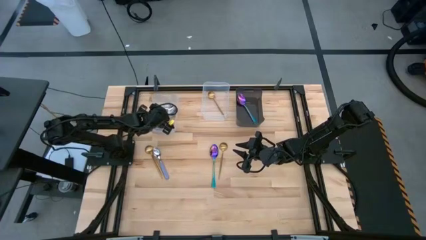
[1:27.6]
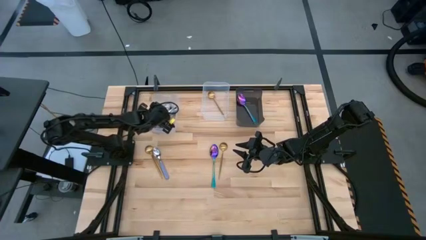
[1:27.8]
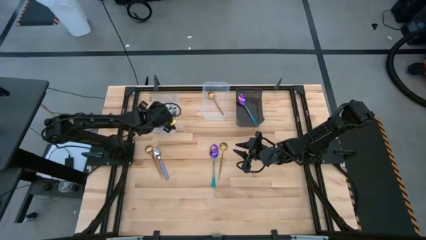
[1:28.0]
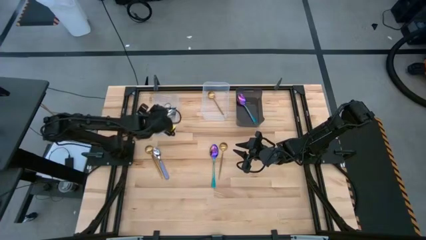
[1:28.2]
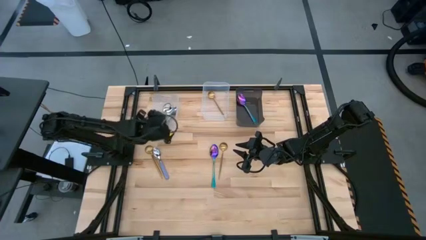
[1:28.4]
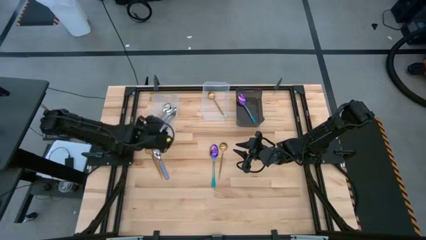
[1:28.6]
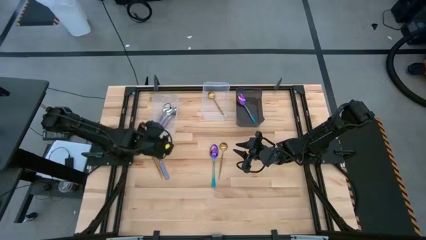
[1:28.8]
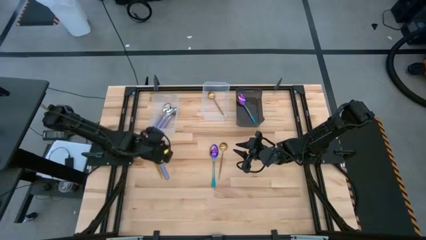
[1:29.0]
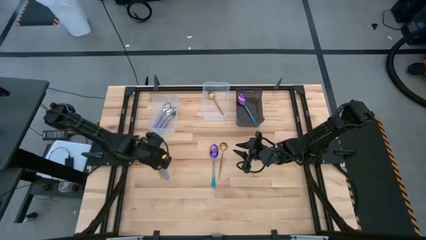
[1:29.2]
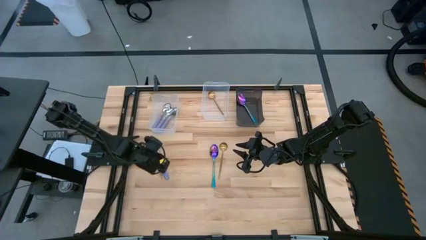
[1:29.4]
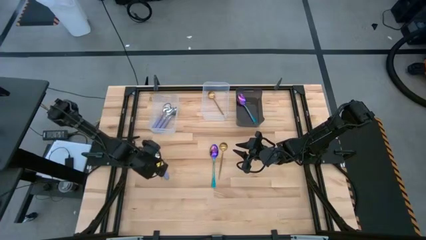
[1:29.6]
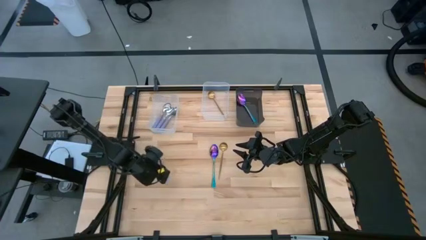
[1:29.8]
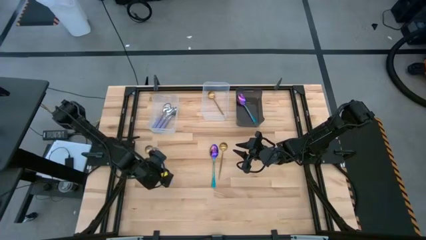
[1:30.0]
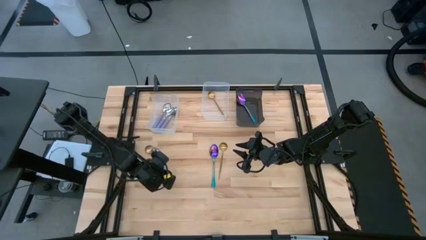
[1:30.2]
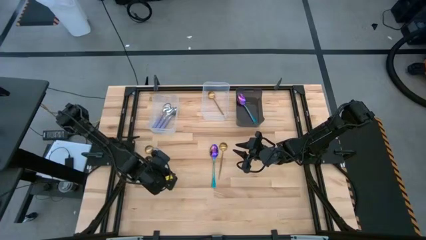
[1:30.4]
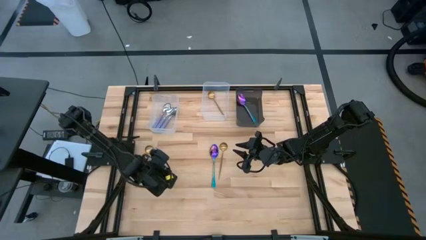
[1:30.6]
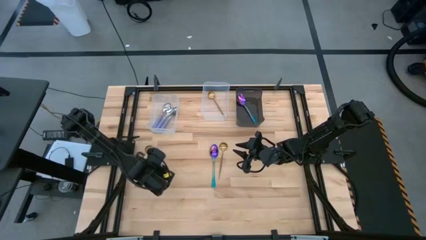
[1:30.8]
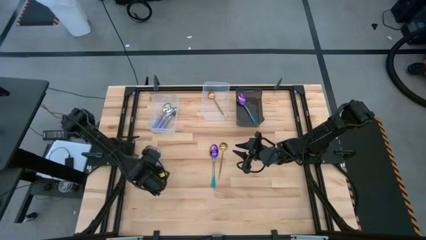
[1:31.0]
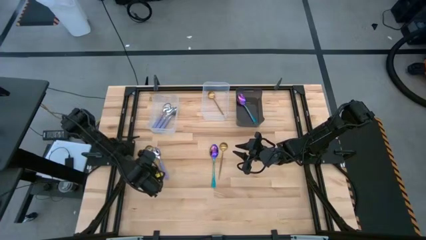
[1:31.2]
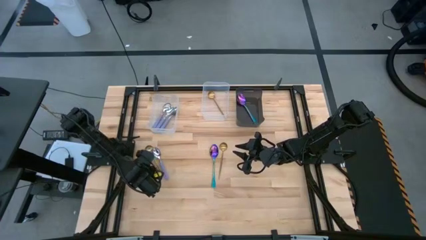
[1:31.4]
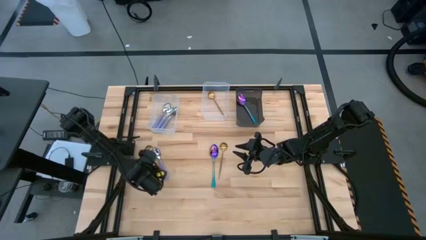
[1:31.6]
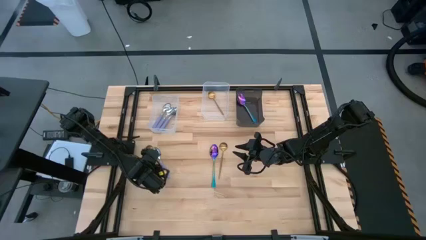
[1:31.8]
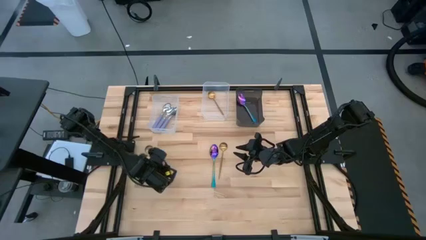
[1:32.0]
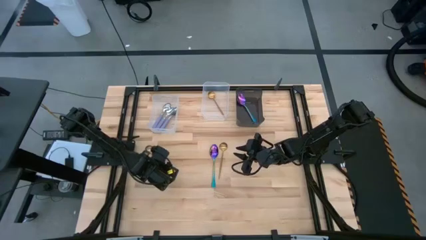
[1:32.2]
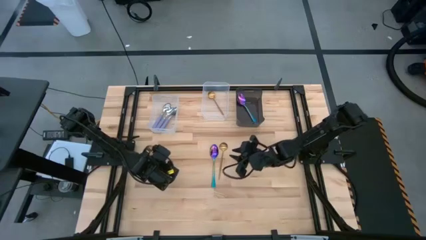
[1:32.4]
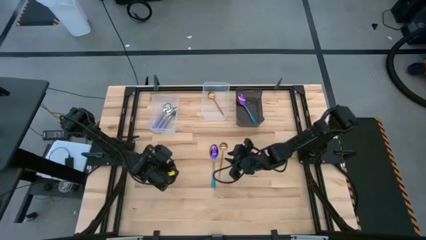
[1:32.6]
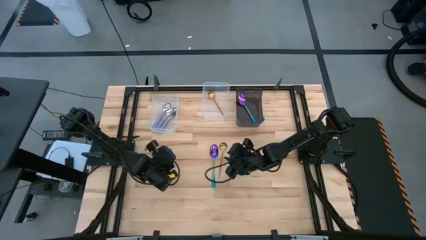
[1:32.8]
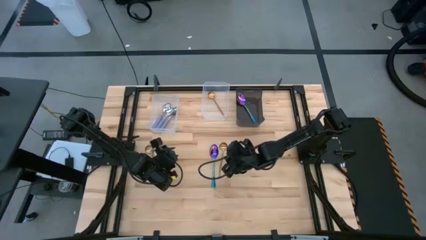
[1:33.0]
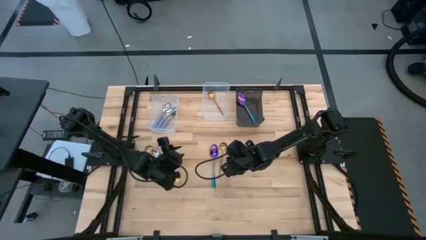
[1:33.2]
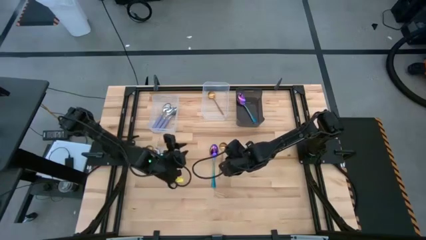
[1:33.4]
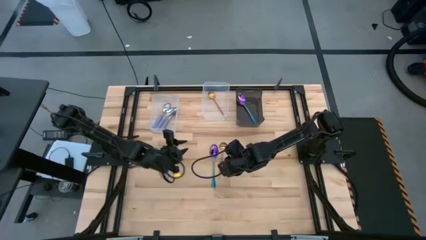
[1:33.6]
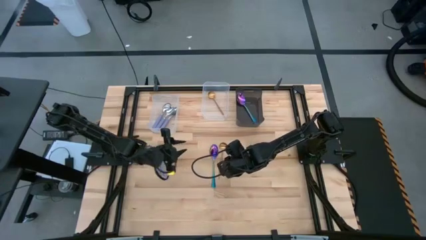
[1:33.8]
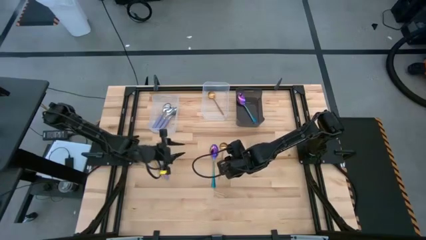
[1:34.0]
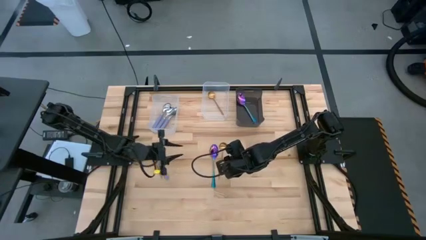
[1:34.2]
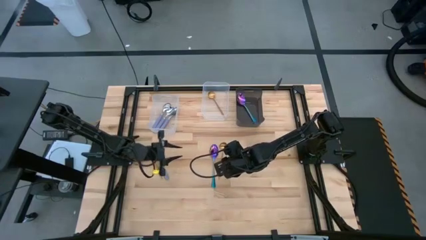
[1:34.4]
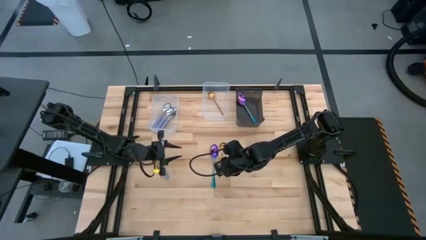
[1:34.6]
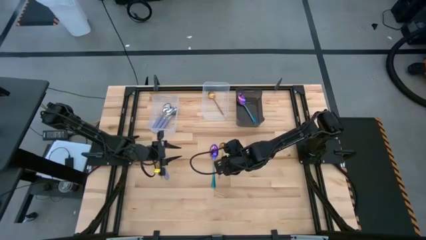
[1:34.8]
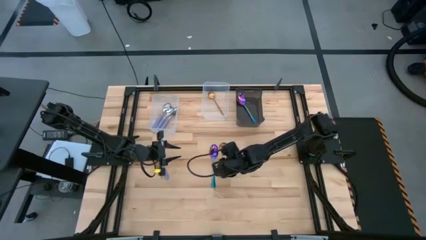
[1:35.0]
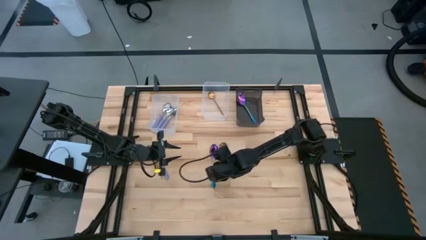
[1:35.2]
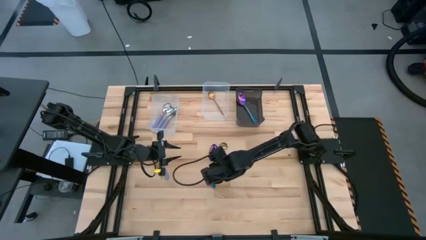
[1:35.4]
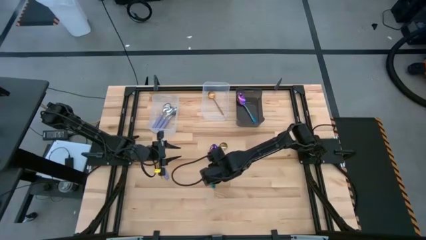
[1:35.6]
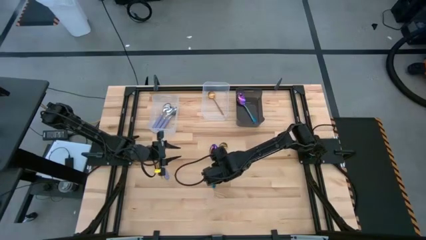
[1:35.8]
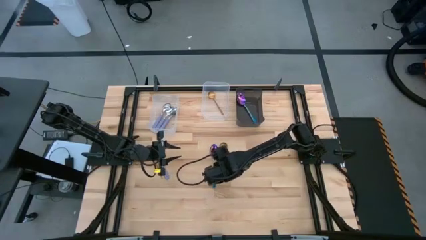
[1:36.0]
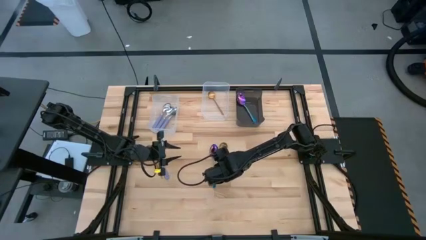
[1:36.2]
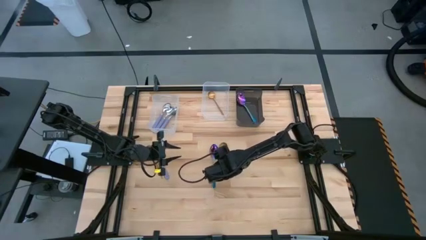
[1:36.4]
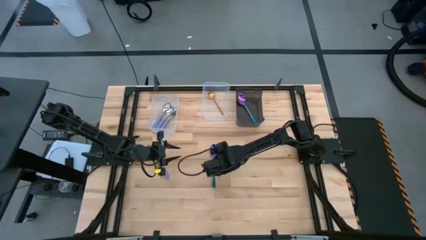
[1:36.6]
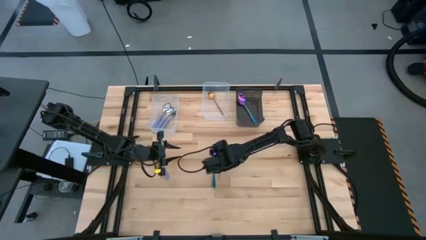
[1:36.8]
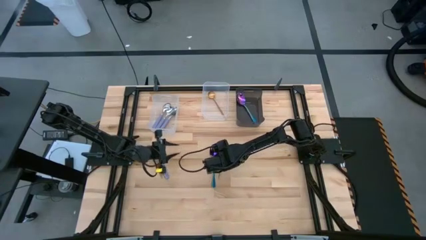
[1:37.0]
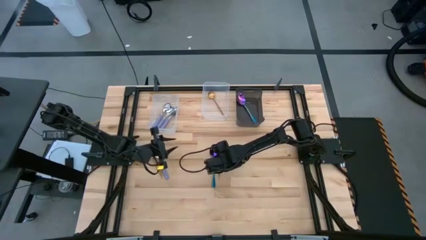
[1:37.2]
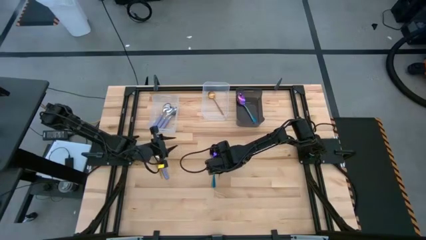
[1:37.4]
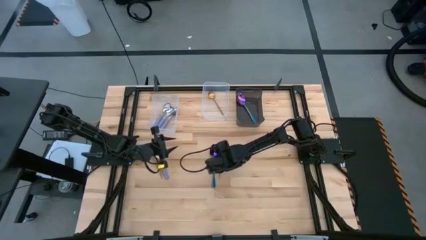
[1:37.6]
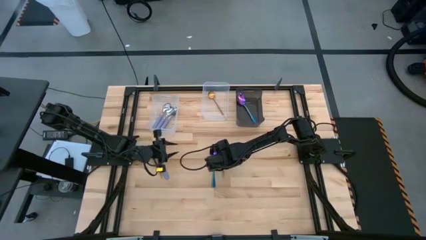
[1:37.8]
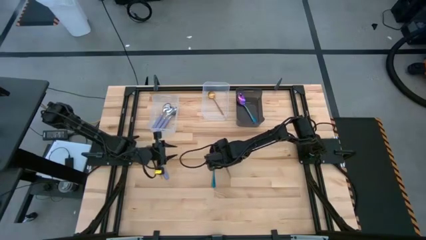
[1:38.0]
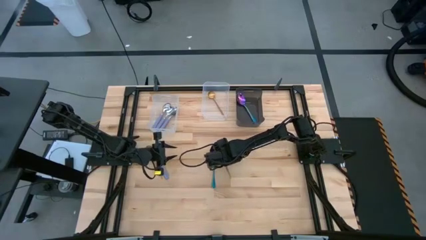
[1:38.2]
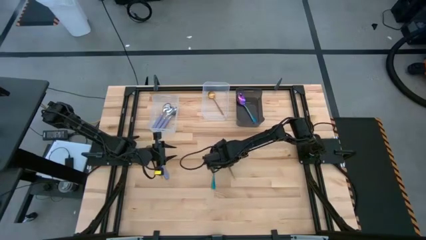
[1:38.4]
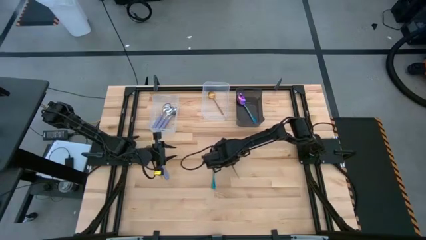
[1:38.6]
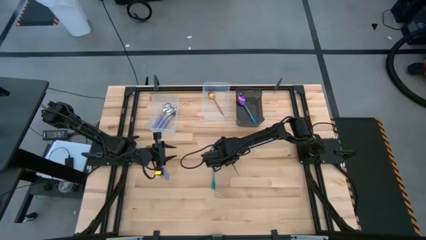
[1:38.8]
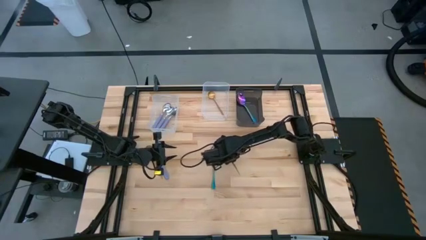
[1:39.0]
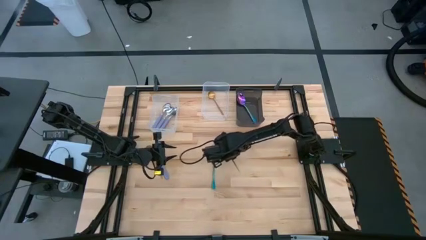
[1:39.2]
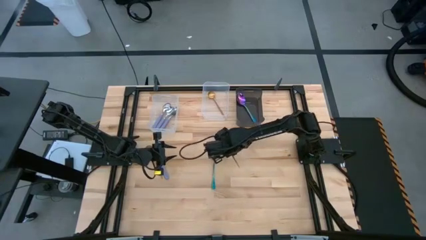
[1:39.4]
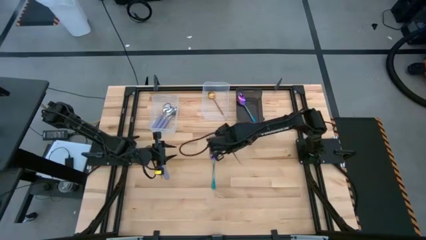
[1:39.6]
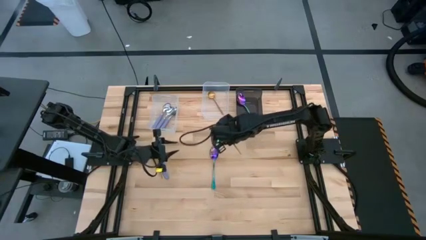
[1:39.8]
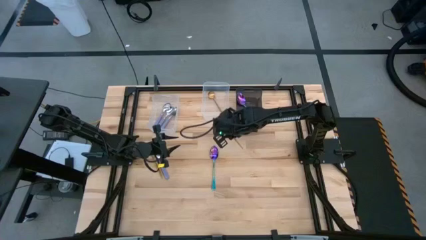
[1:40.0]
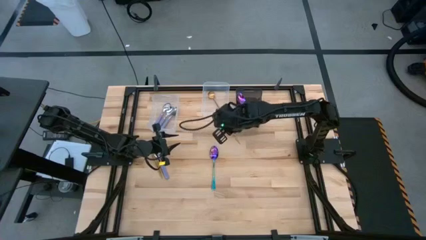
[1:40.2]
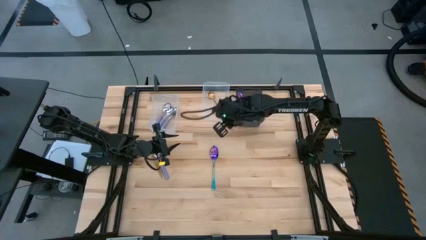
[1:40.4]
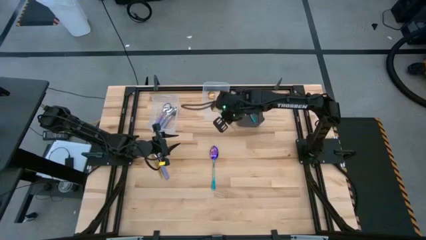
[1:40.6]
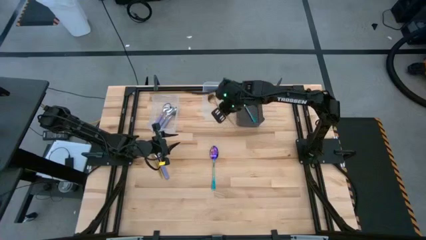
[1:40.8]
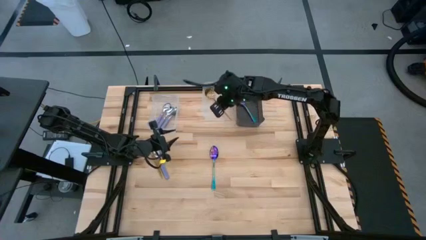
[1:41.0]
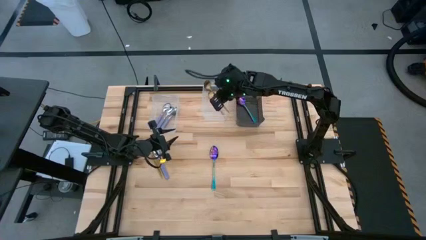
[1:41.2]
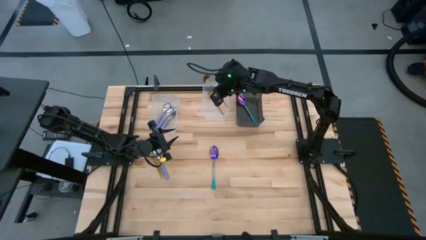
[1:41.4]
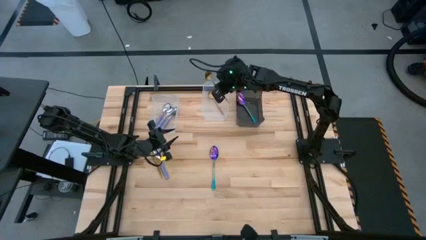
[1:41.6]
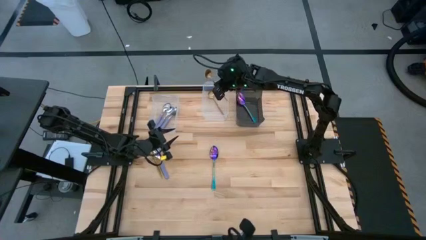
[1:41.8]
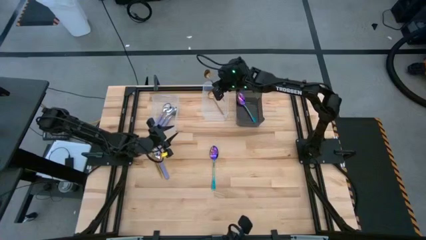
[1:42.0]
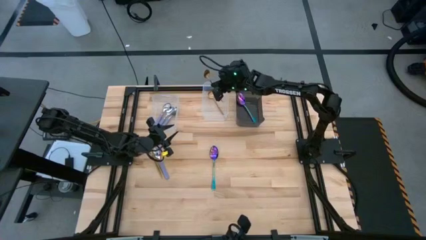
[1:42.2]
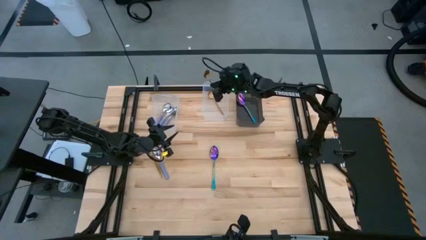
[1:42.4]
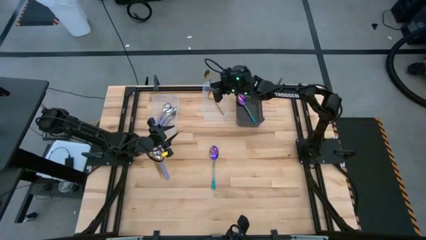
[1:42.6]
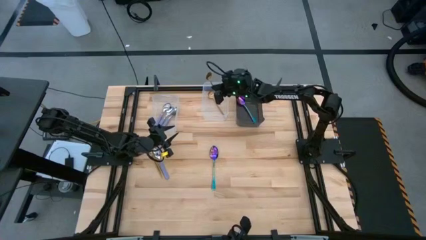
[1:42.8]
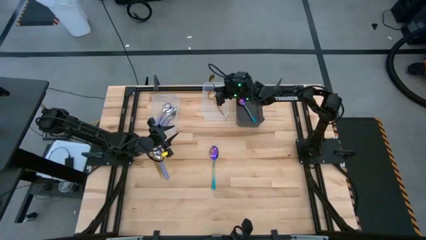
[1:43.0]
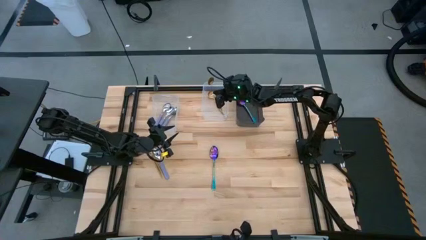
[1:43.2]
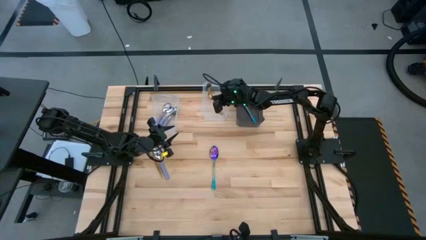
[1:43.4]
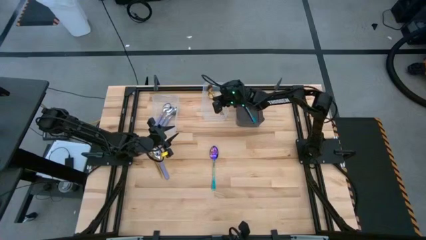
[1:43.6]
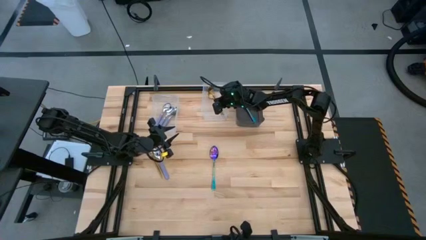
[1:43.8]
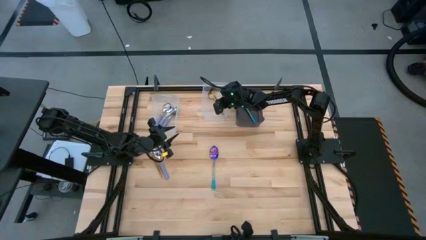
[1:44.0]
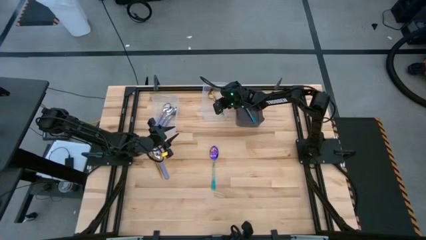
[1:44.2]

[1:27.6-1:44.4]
Task: Sort silverware by color (type)
Put the gold spoon into the right transparent bin
